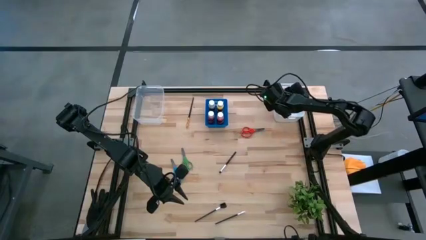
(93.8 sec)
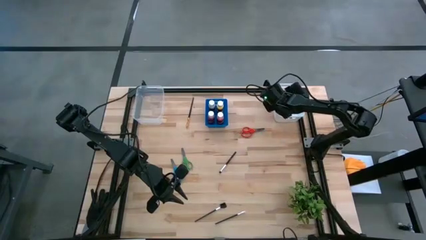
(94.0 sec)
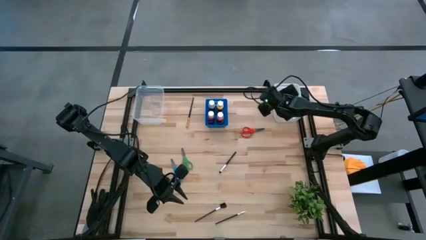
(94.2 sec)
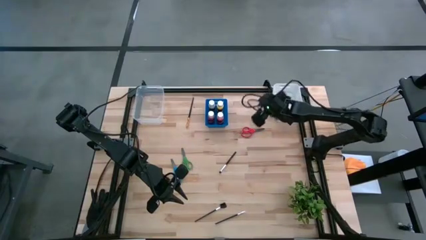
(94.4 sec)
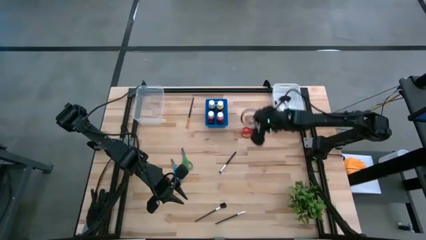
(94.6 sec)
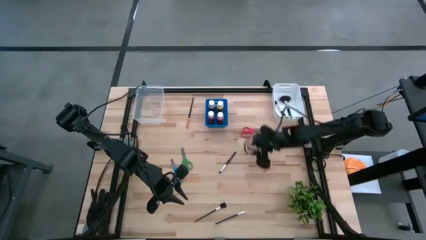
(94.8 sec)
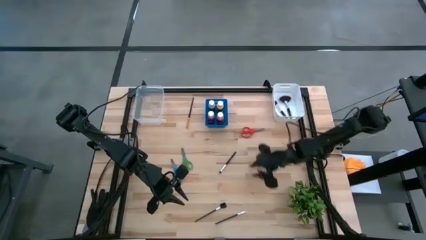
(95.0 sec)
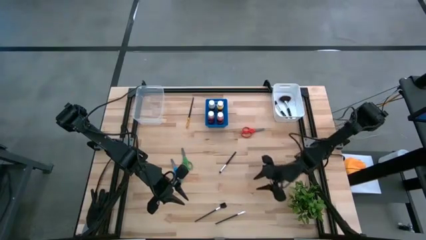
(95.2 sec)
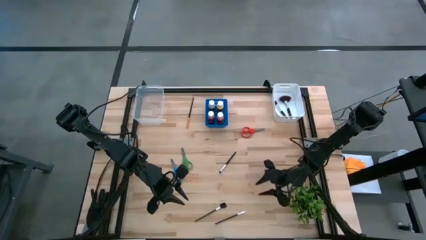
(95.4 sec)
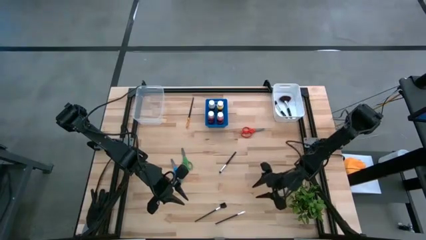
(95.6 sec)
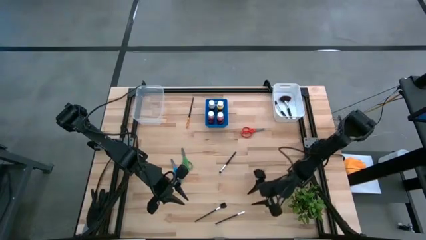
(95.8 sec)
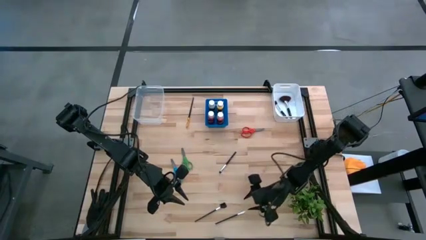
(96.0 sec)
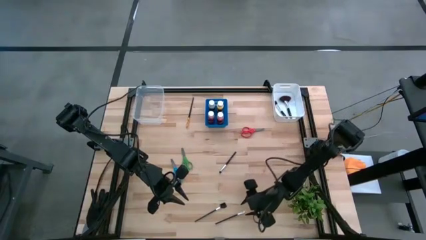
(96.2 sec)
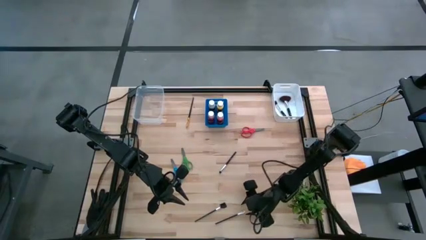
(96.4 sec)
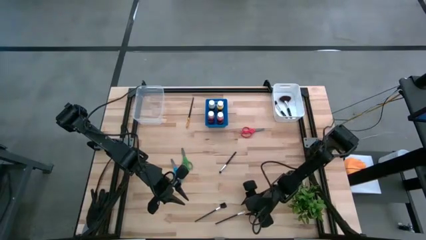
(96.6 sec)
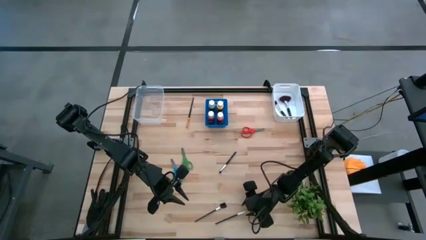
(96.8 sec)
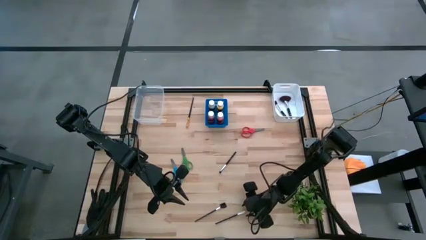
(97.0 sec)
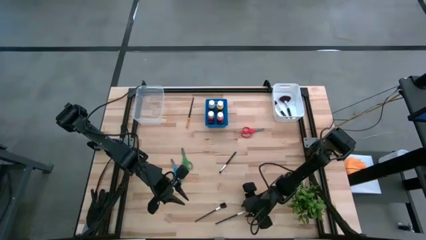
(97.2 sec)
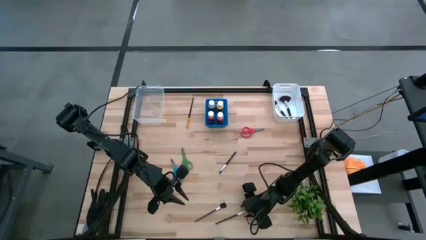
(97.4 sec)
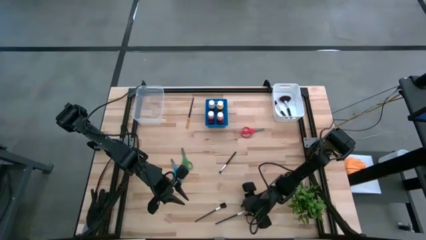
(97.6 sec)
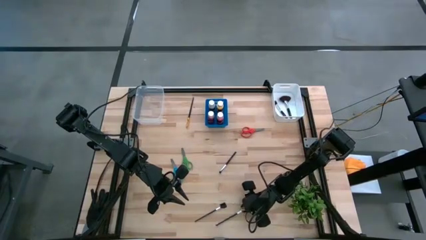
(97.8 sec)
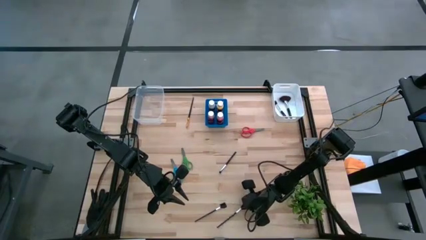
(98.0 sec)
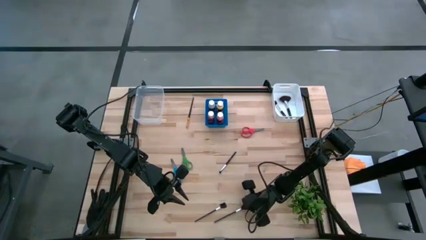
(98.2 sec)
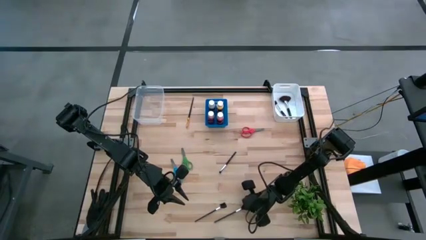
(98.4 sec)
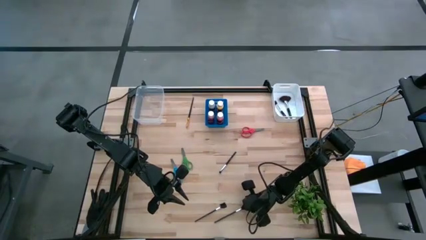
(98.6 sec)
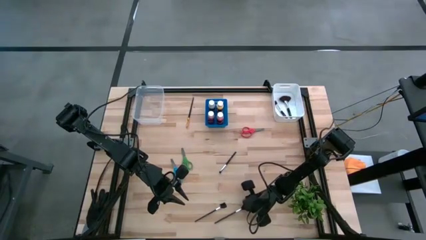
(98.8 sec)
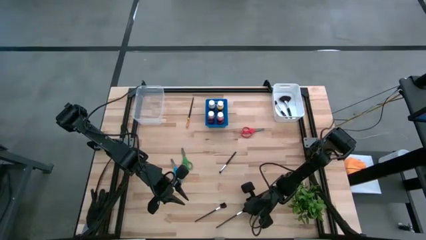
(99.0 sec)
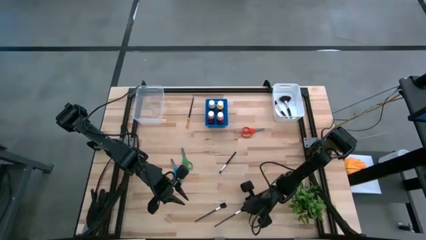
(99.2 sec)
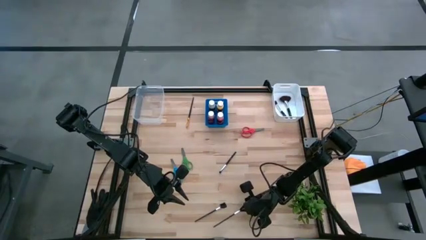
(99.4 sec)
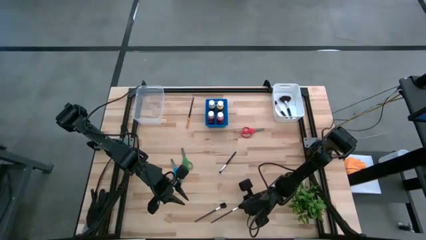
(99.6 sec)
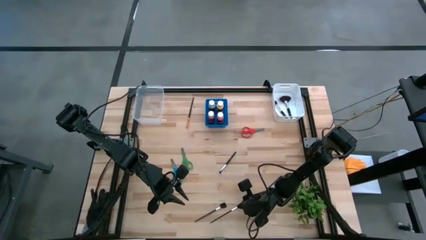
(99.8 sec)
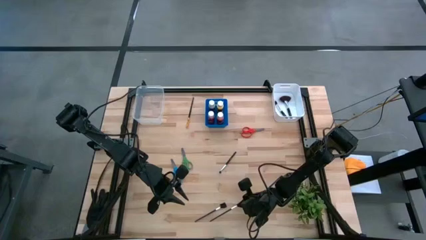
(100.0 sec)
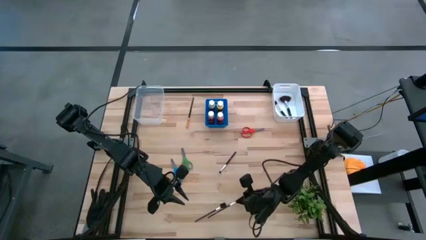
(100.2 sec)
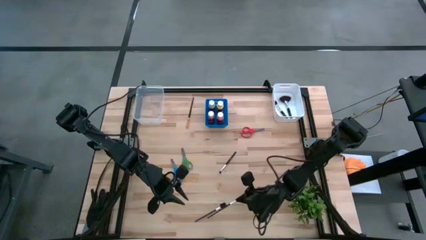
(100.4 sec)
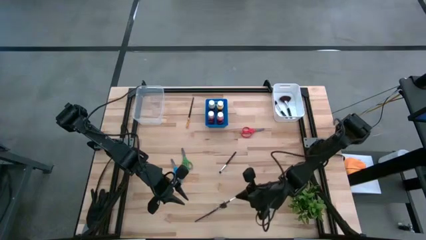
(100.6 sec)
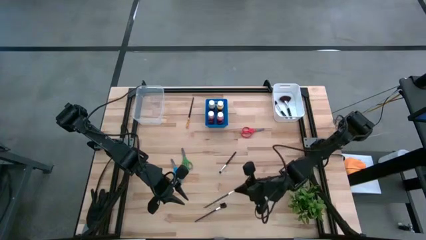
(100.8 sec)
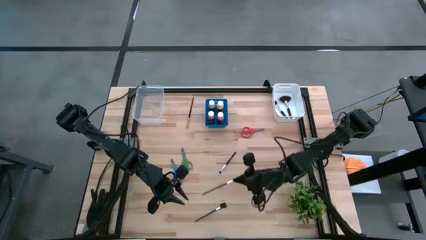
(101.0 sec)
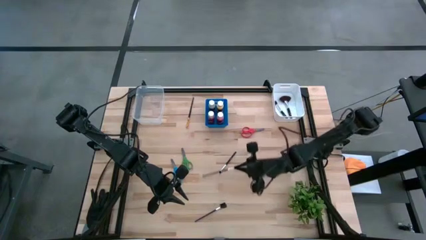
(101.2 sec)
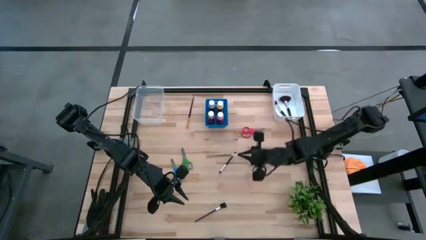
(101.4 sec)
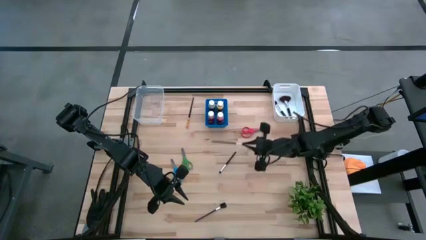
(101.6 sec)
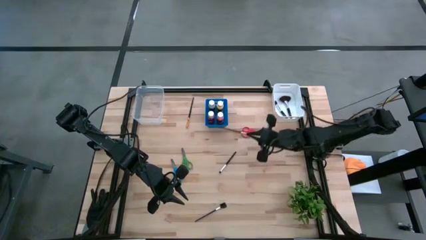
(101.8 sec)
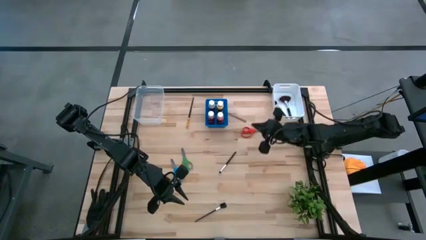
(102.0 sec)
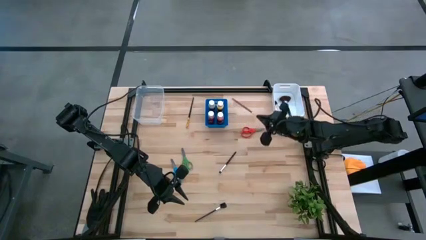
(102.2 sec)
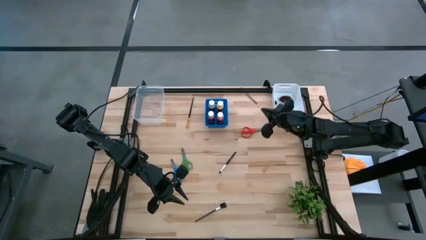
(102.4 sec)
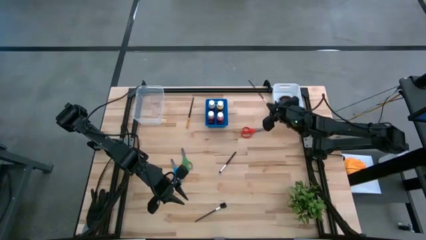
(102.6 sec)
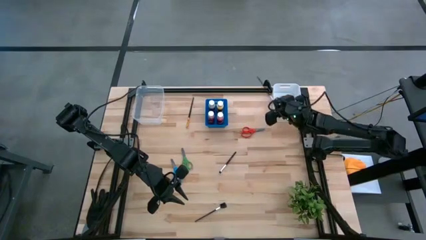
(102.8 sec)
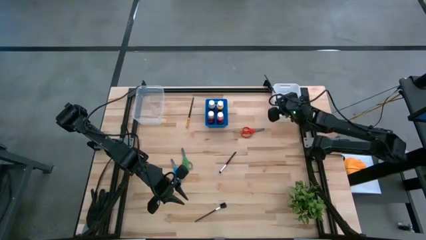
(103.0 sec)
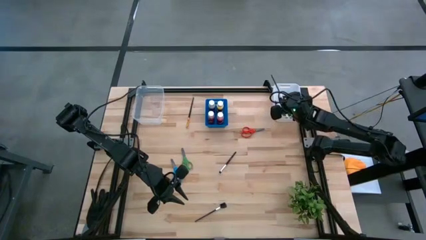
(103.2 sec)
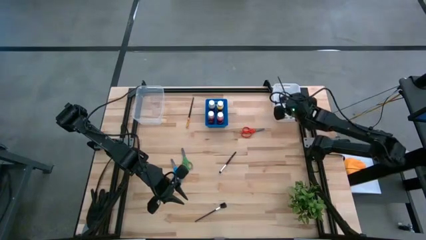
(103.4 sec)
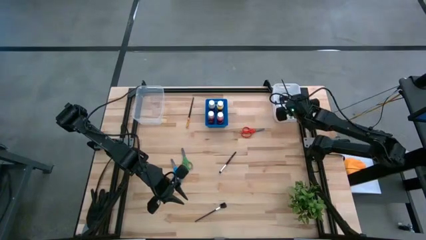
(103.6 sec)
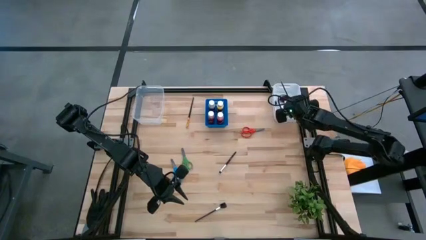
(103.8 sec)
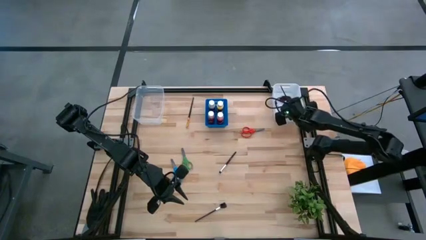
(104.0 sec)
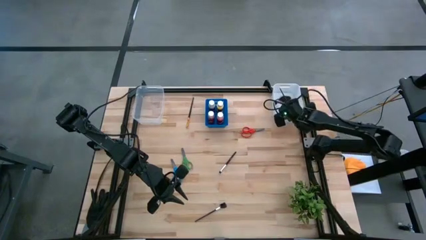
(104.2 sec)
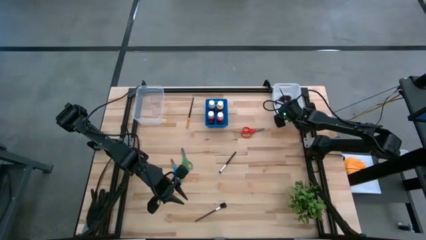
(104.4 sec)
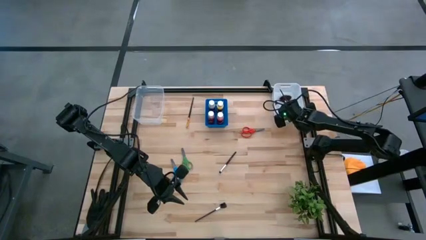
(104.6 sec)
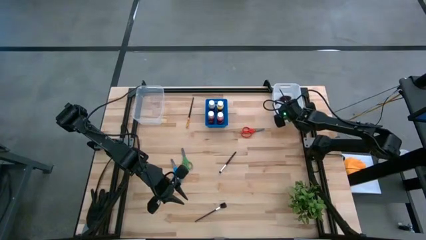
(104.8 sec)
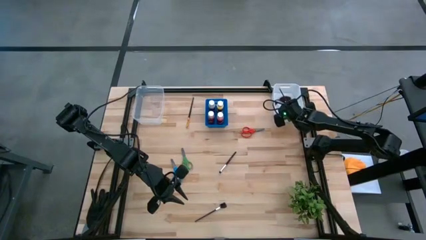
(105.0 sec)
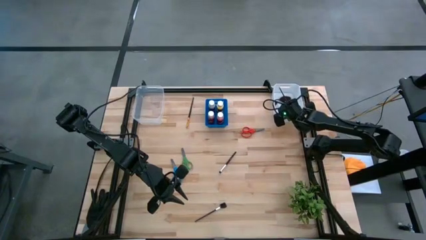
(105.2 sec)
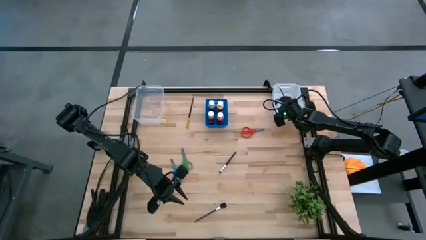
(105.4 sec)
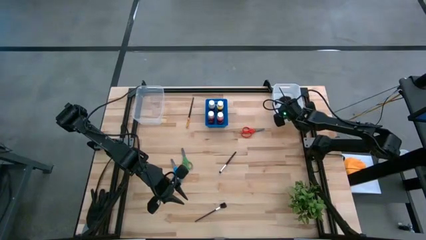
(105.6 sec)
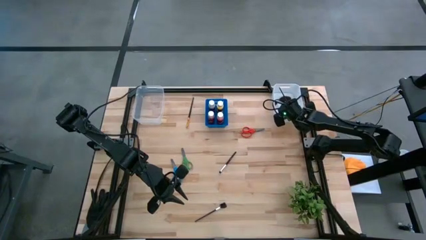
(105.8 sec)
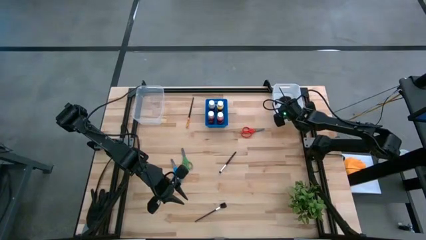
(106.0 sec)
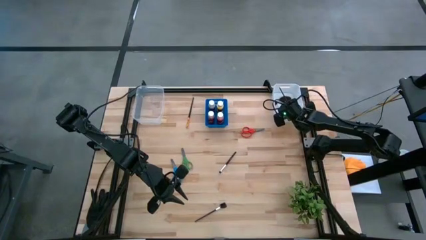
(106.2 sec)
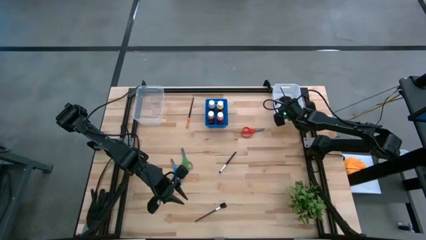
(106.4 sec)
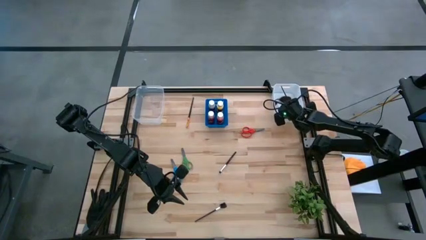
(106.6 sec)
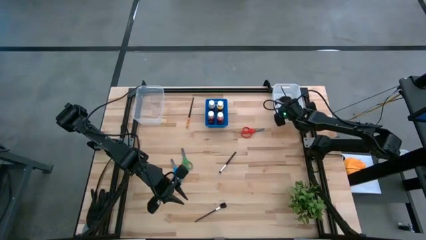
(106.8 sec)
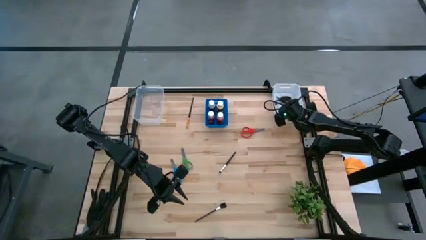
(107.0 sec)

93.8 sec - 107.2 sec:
Task: Pick & Place Paint Supplies
Put the black eyeshadow brush into the white bin
